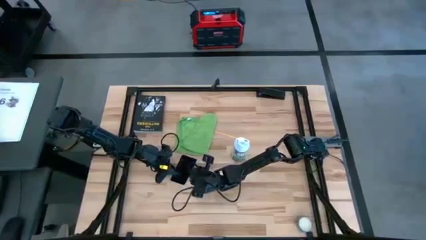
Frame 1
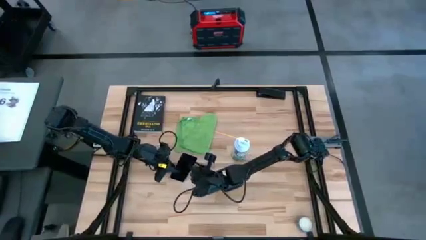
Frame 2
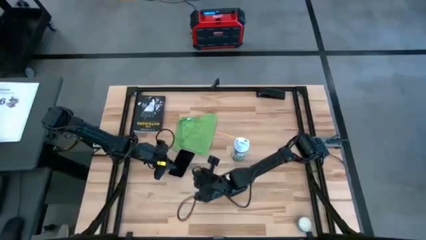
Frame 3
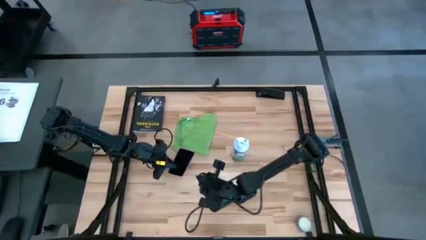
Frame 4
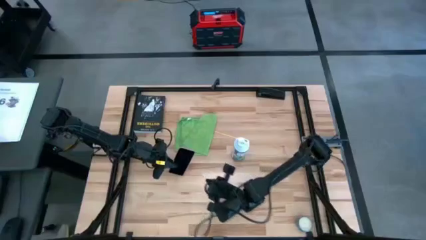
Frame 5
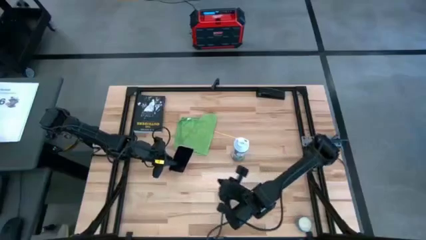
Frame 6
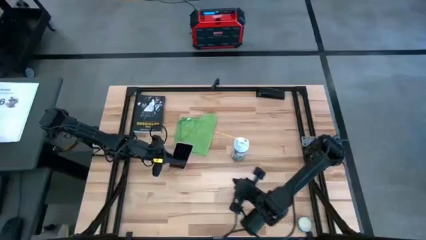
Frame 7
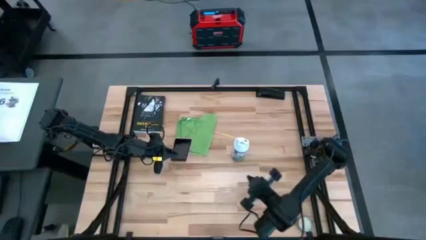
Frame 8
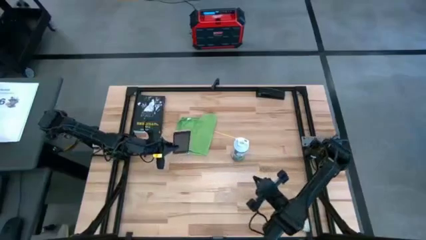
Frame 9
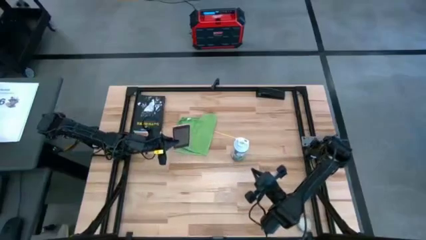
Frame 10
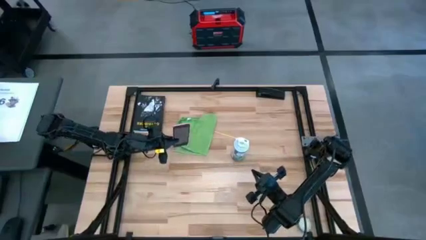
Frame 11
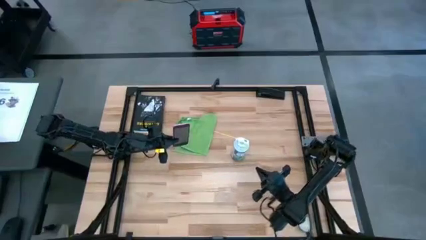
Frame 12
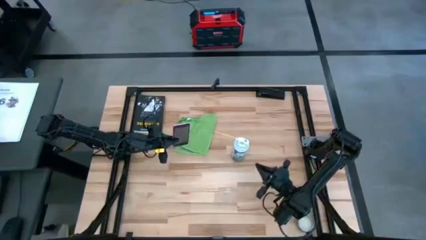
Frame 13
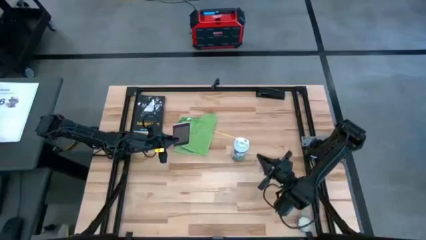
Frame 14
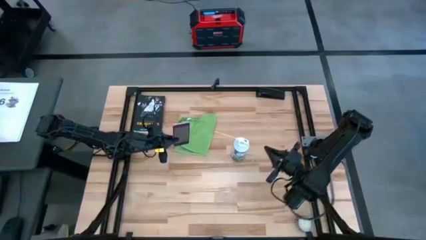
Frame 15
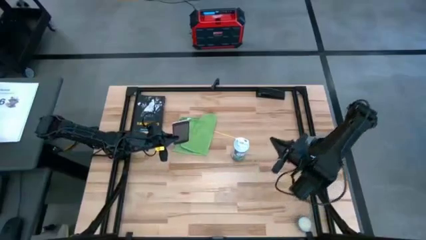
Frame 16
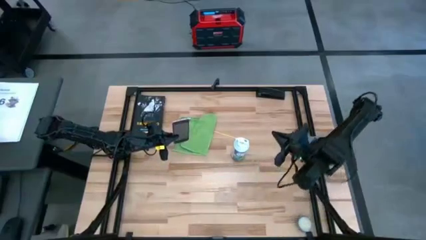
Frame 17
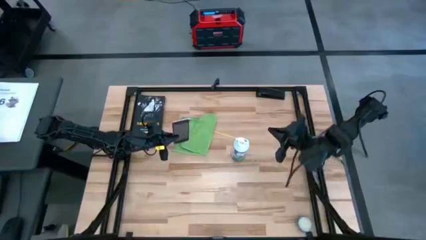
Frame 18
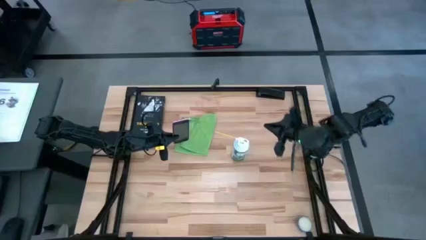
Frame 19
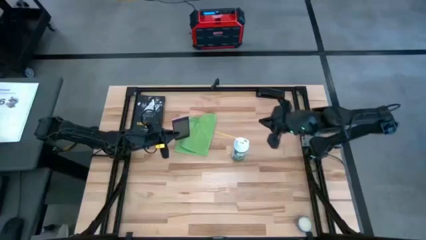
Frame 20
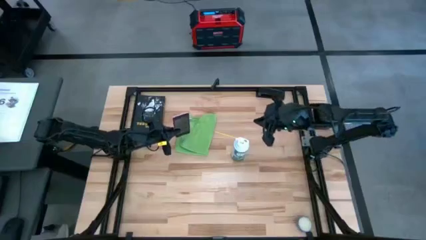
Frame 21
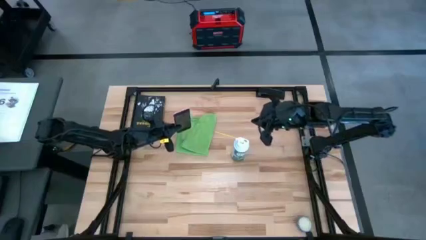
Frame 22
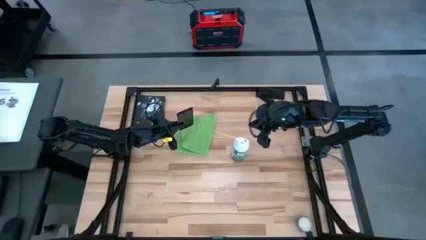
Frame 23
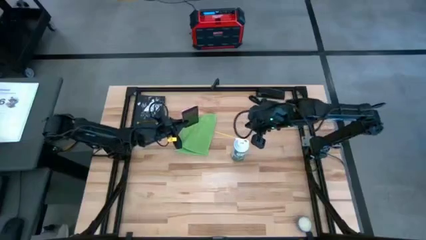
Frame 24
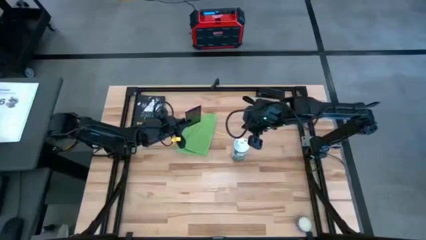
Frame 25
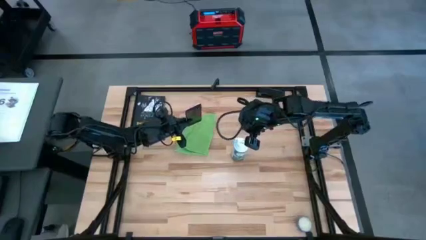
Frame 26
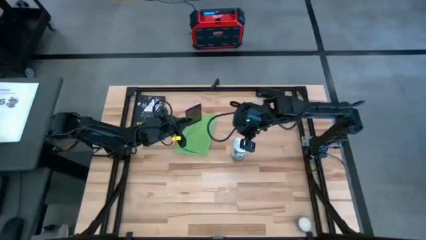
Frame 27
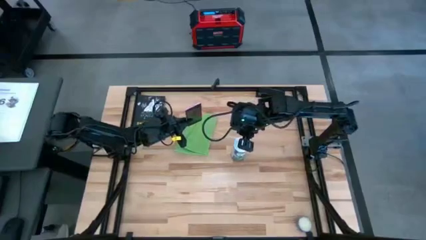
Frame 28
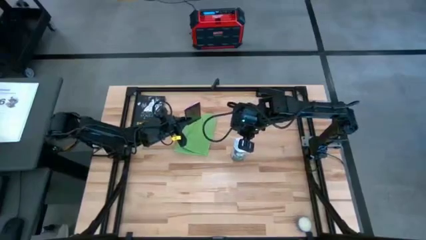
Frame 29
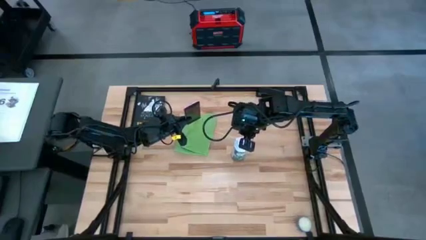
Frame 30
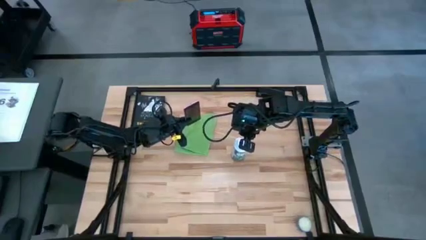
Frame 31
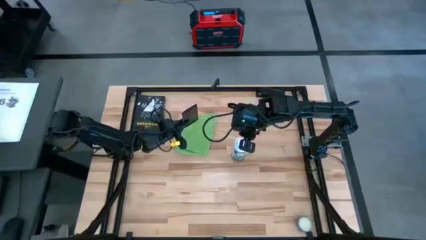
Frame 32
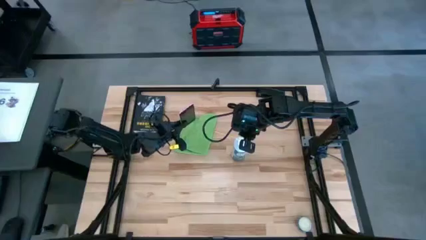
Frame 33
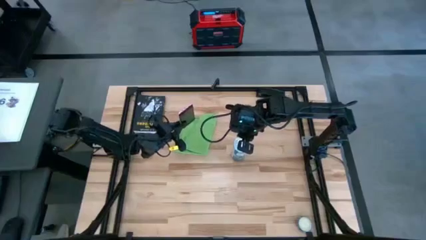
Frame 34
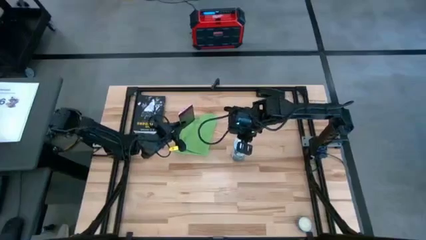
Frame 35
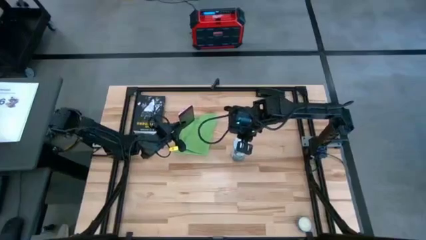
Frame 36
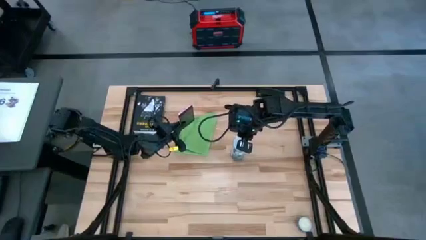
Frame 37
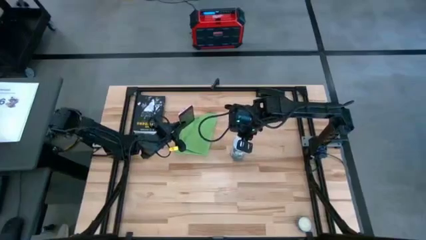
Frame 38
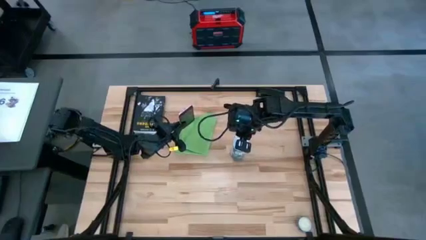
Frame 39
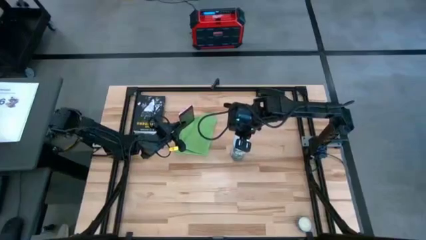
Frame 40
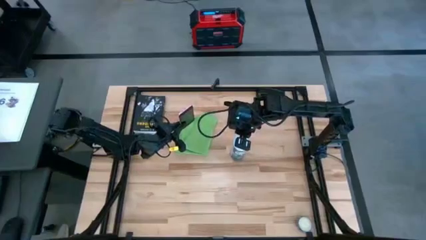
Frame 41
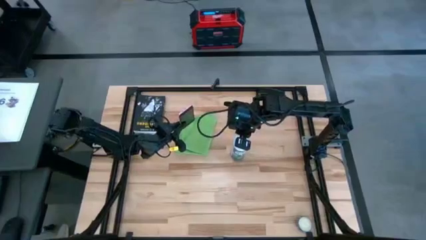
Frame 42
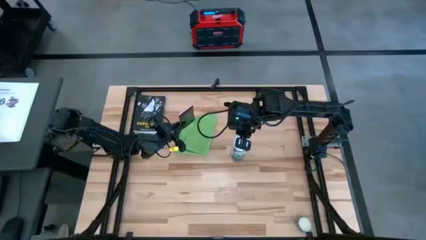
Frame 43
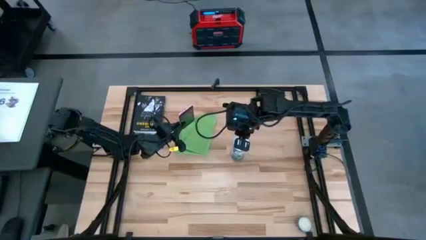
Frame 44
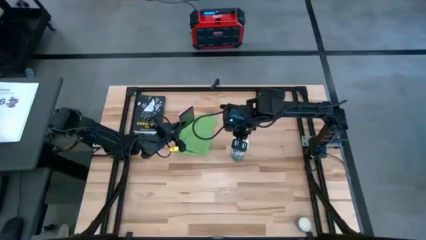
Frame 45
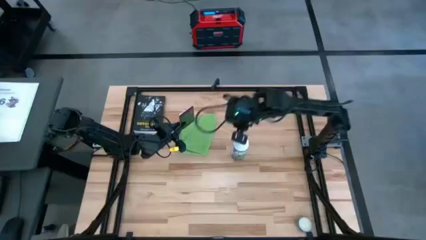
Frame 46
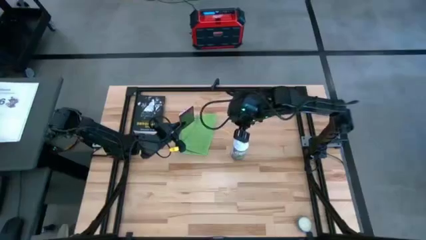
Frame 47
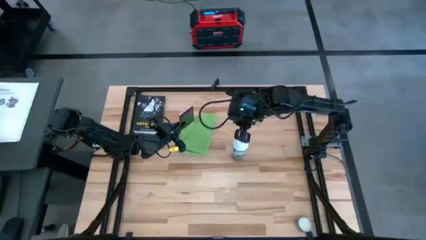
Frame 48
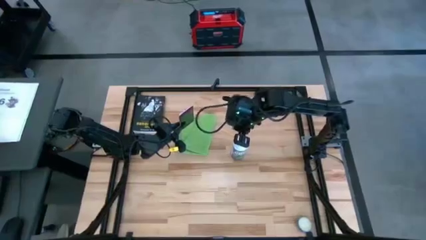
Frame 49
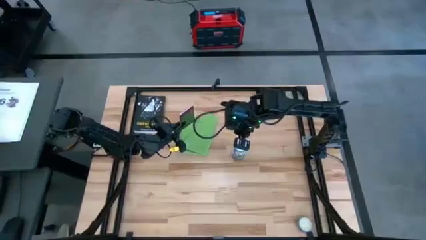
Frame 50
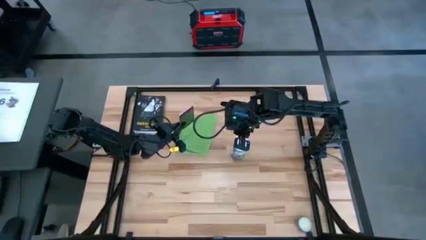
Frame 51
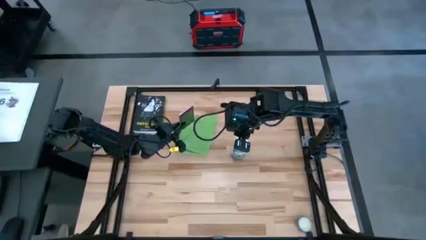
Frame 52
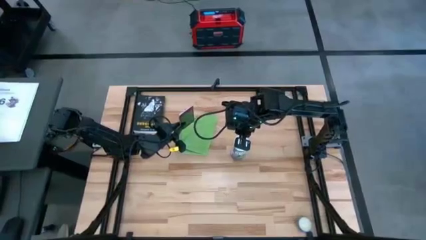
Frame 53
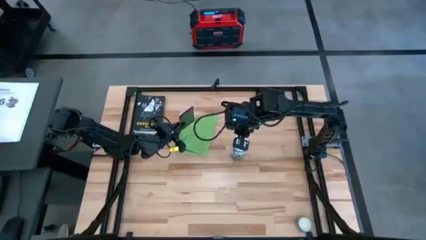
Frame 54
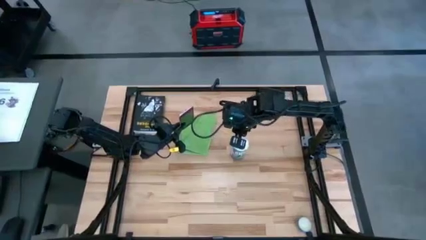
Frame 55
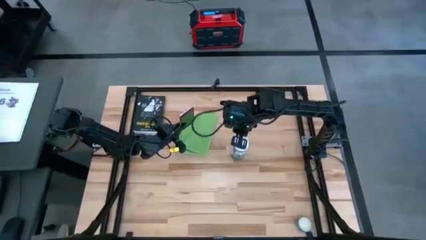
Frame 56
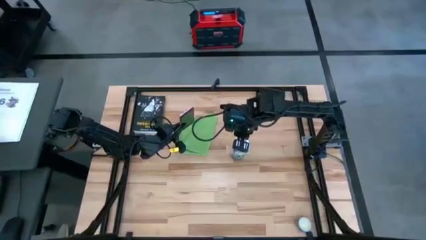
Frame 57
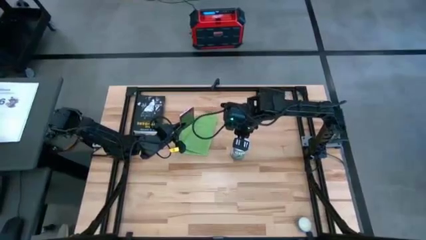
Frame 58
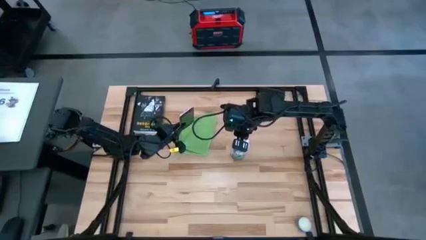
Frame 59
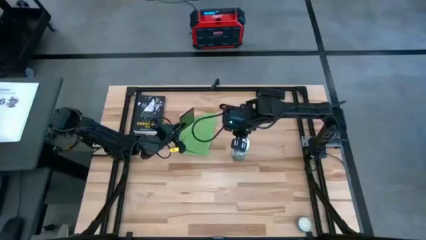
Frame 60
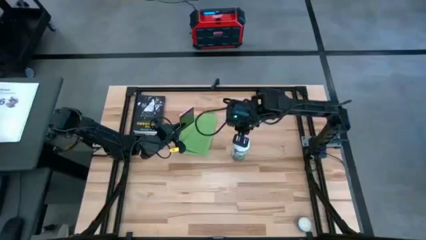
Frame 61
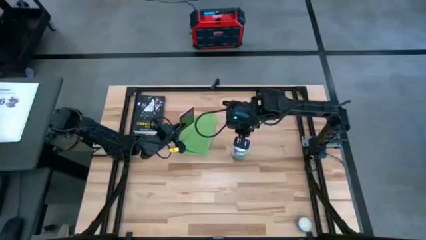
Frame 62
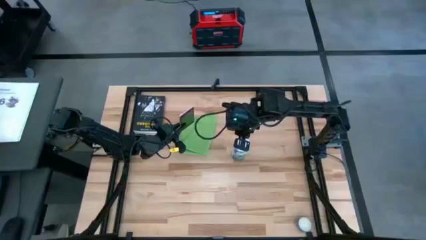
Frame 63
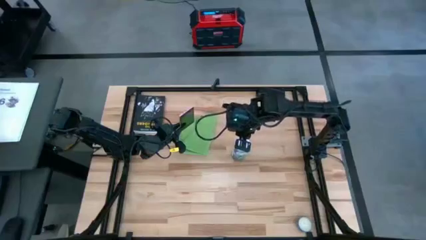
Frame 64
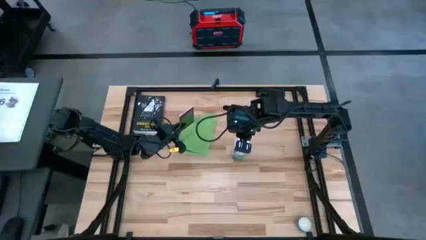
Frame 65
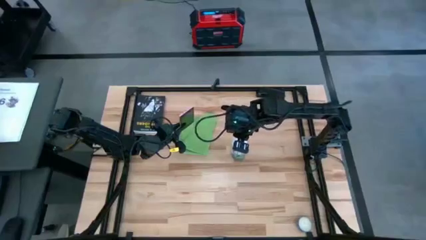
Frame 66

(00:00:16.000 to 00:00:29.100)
Task: Apply microfiber cloth
Spray the pink cellphone using the spray bottle

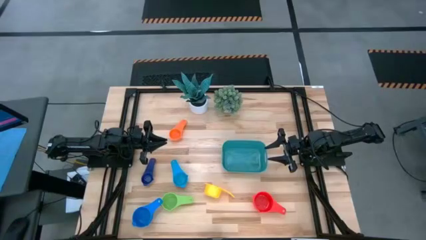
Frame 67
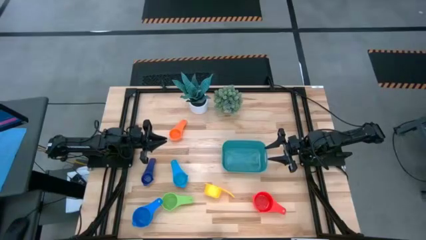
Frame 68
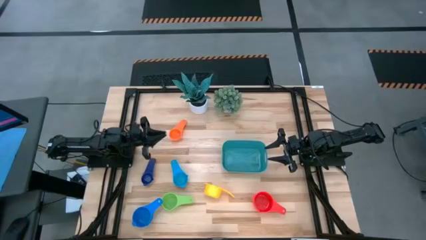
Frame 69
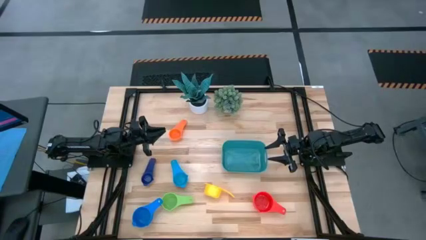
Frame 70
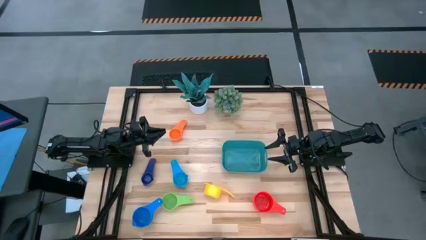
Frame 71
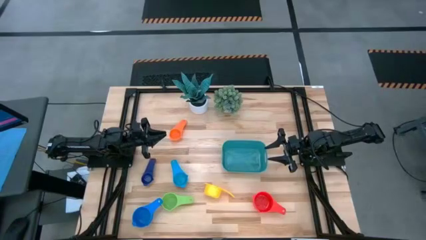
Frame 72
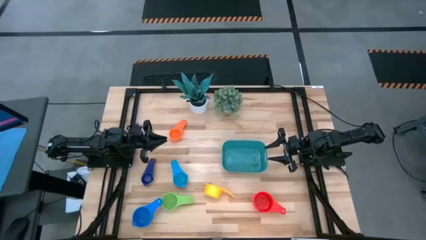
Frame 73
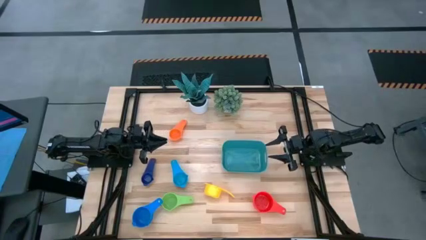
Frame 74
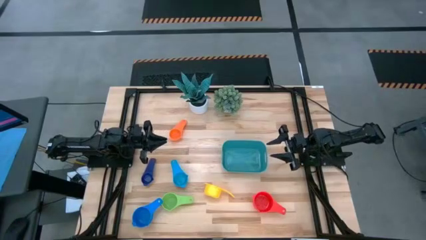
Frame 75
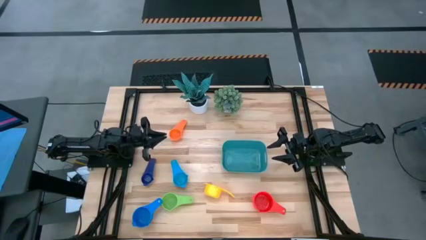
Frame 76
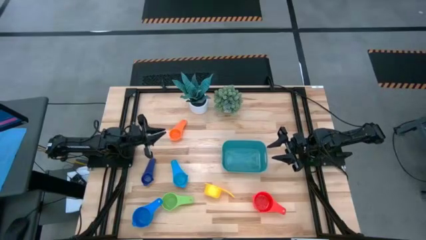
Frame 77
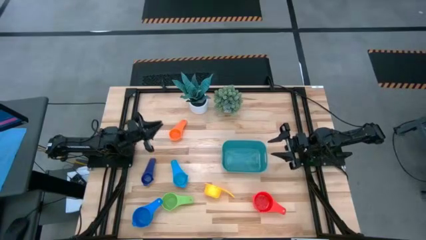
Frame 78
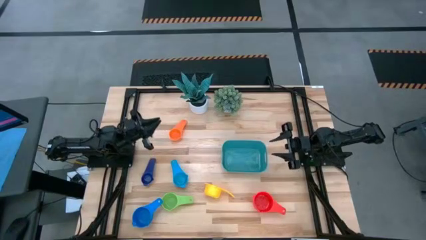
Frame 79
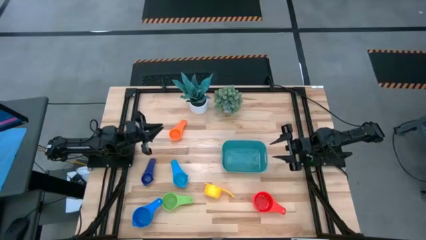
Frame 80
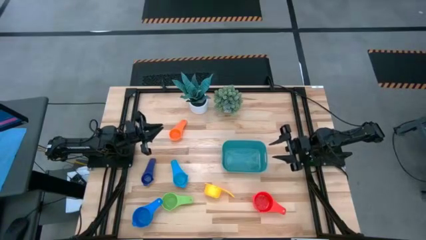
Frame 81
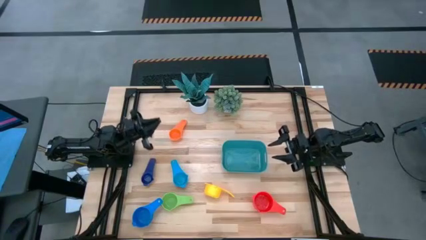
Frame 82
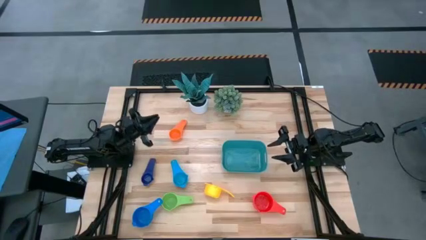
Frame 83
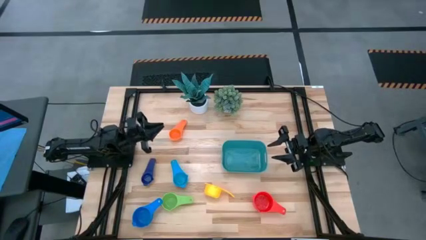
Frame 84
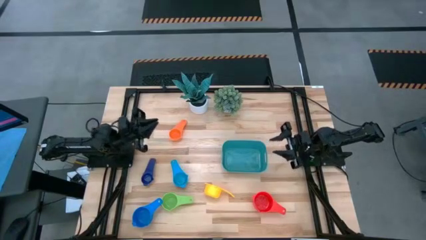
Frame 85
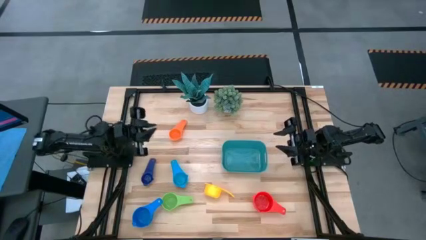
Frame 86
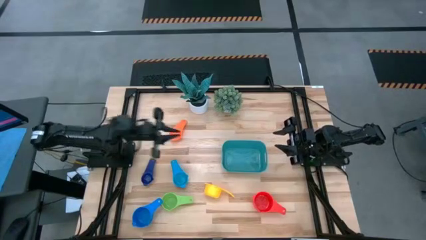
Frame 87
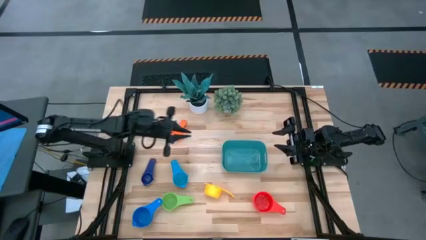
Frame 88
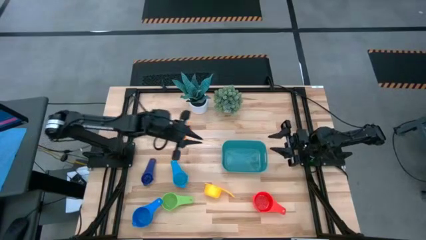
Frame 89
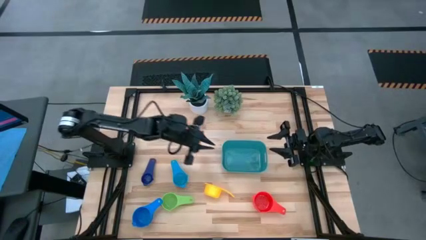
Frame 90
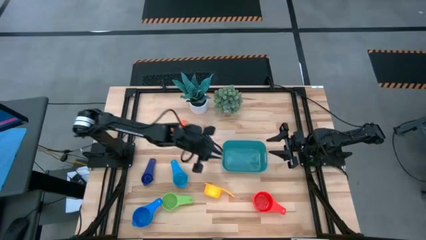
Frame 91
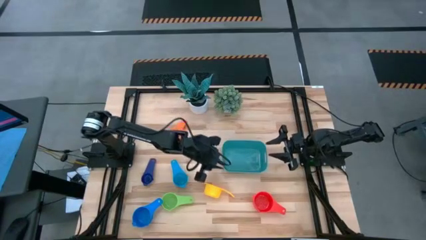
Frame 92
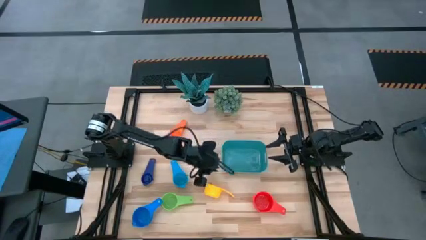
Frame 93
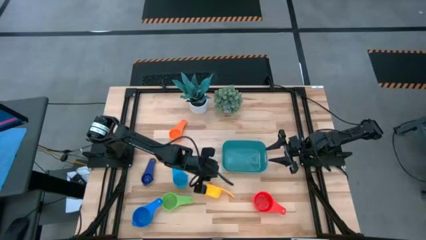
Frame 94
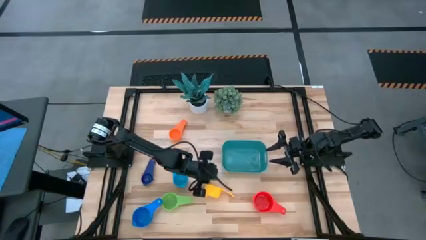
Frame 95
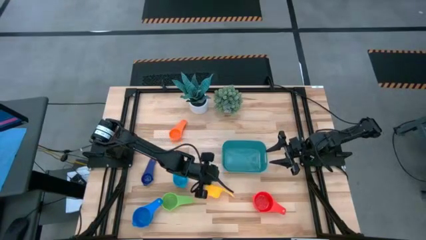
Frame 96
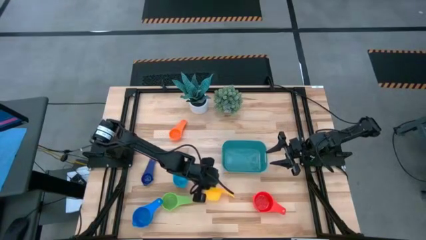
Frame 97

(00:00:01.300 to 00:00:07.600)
Task: Nest measuring cups in basket
Adjust the yellow measuring cup
